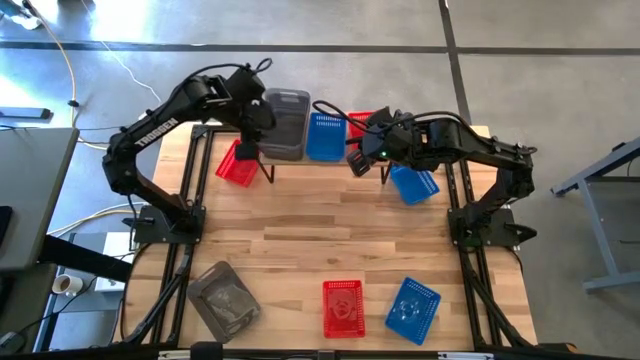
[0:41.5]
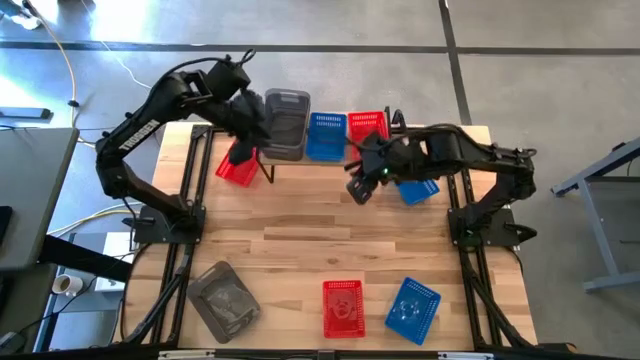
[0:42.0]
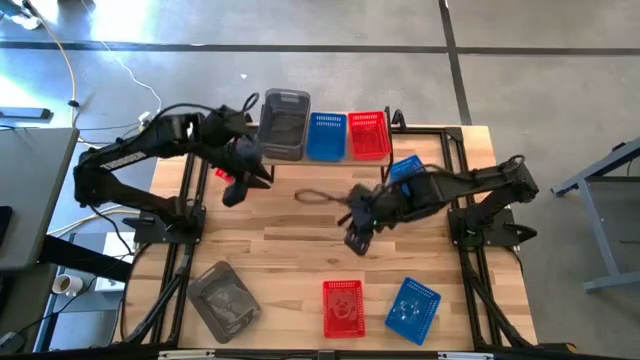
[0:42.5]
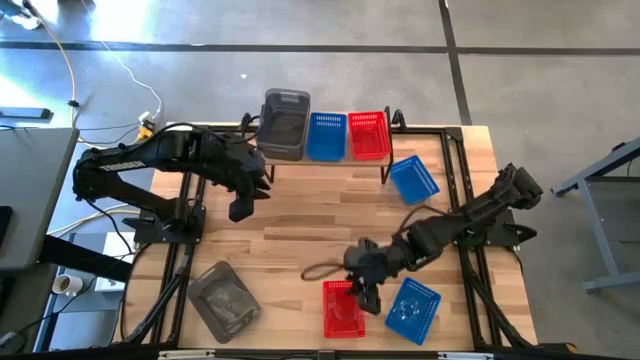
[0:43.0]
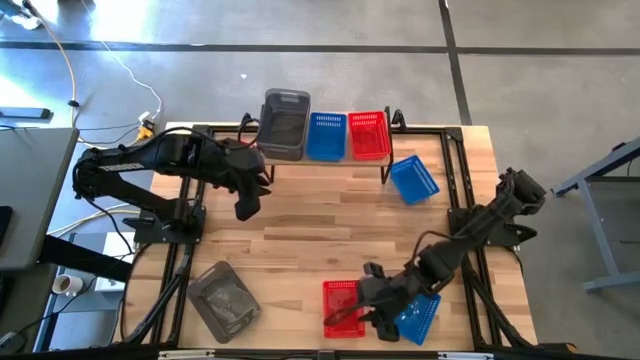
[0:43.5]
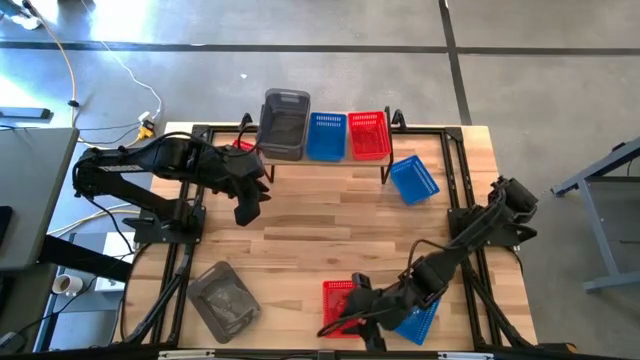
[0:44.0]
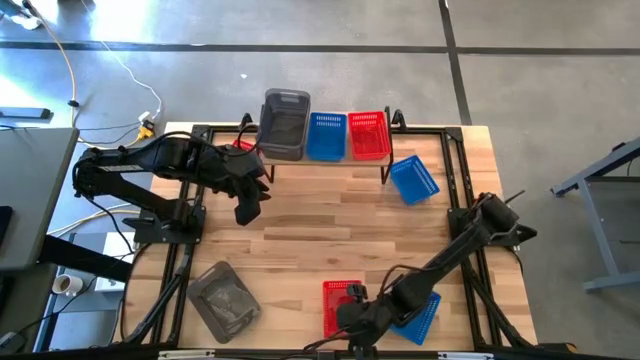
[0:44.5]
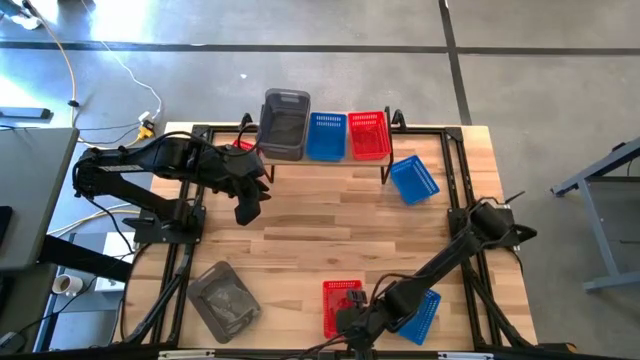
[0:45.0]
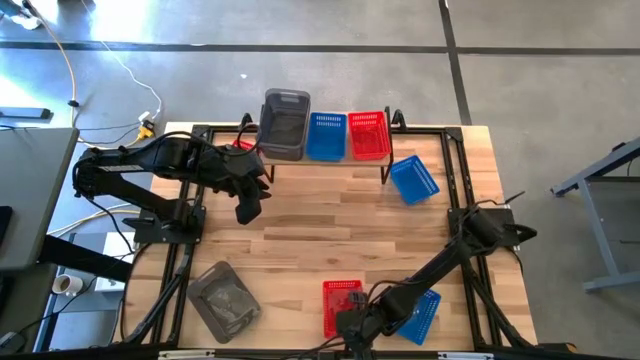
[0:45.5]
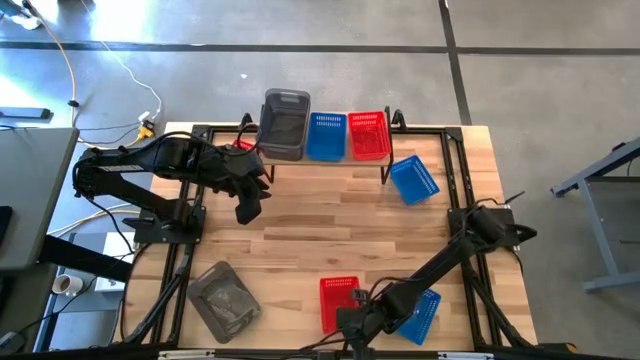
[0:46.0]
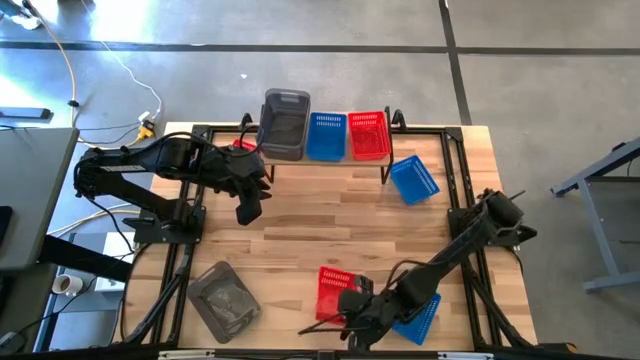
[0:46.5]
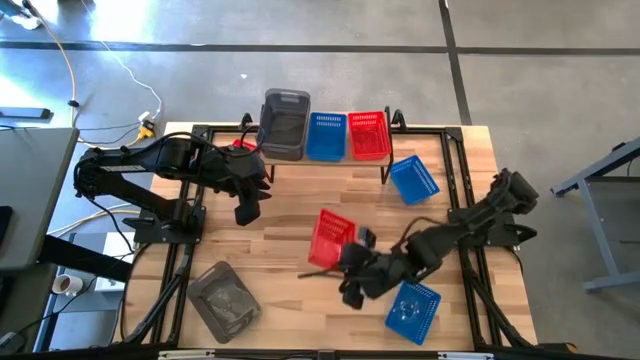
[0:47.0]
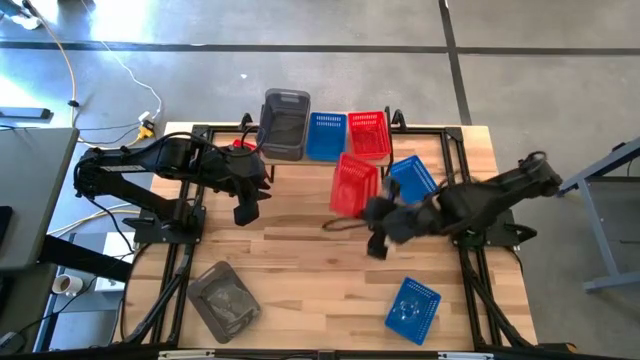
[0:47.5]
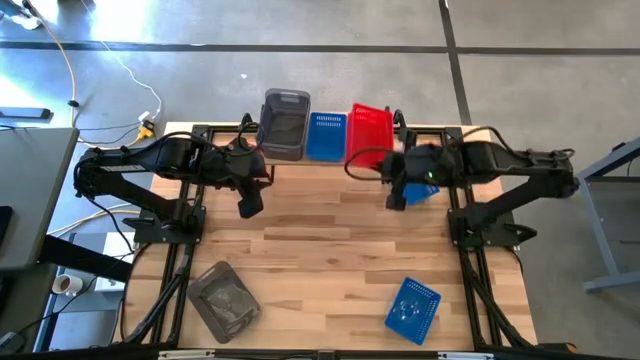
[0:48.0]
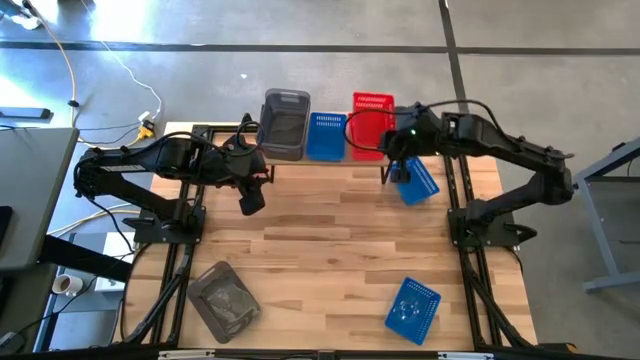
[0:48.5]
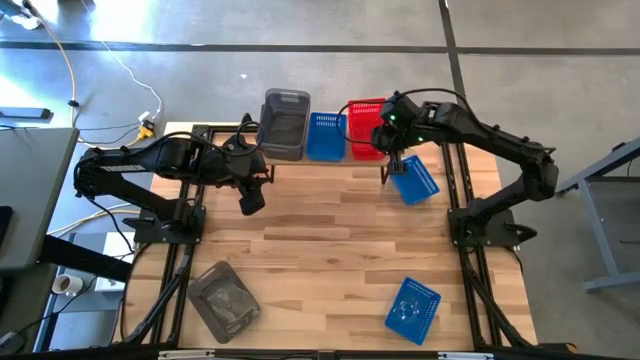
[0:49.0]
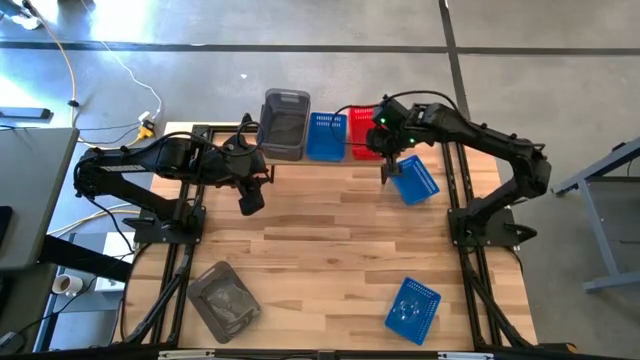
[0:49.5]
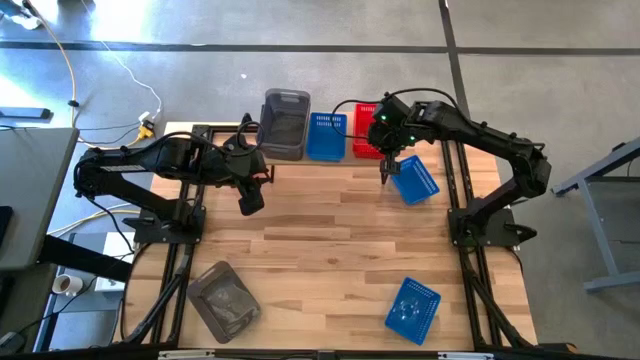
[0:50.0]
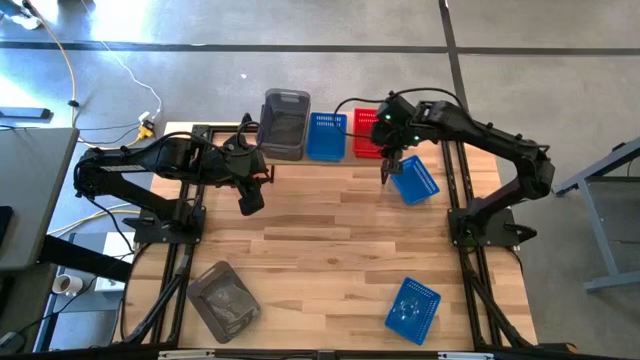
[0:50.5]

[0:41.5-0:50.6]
Task: Stack baskets on shelf by color
Stack the bottom red bin on top of the red bin on the shelf

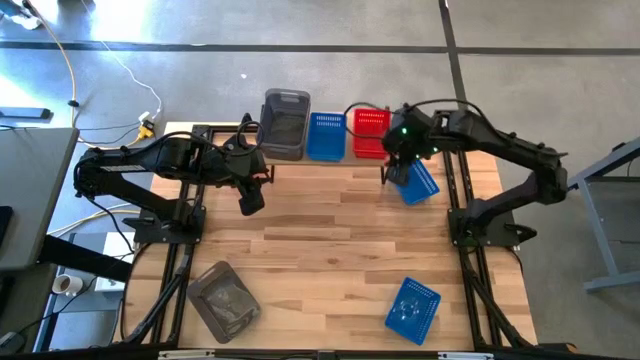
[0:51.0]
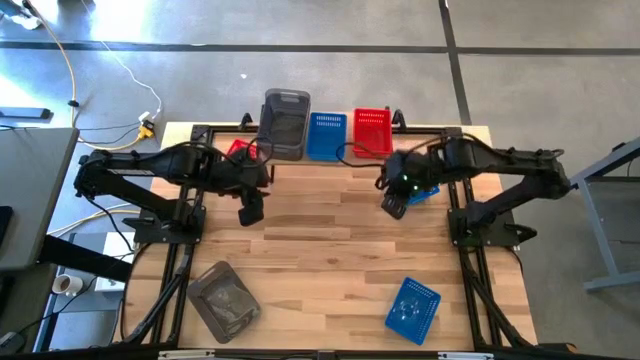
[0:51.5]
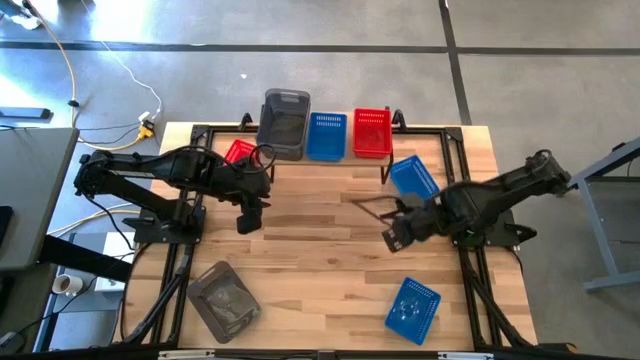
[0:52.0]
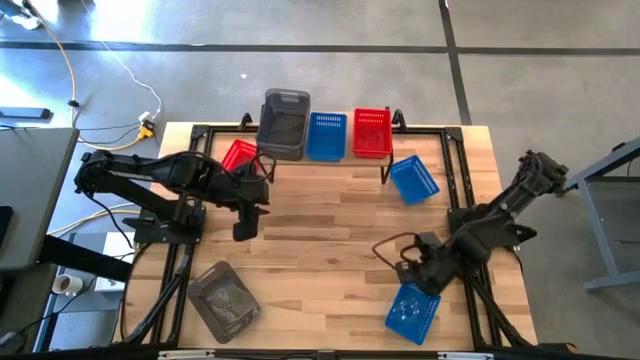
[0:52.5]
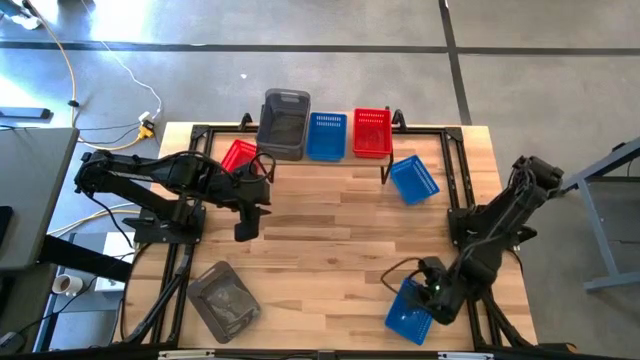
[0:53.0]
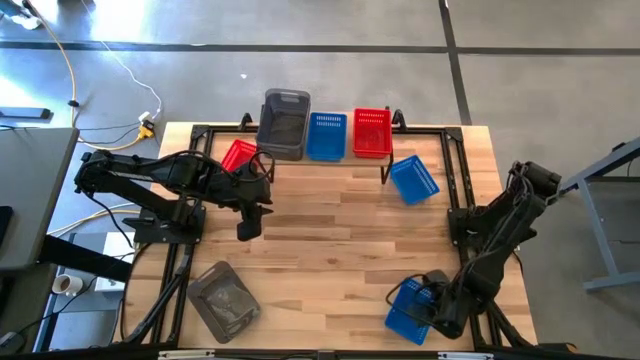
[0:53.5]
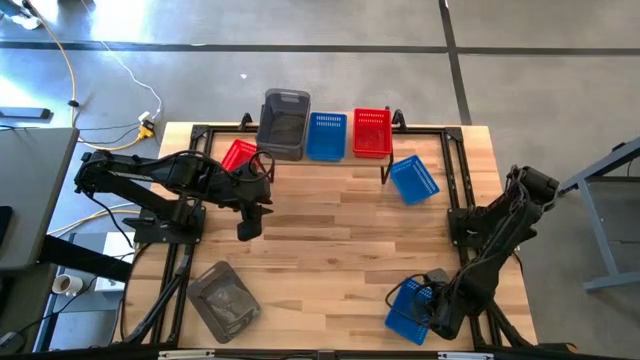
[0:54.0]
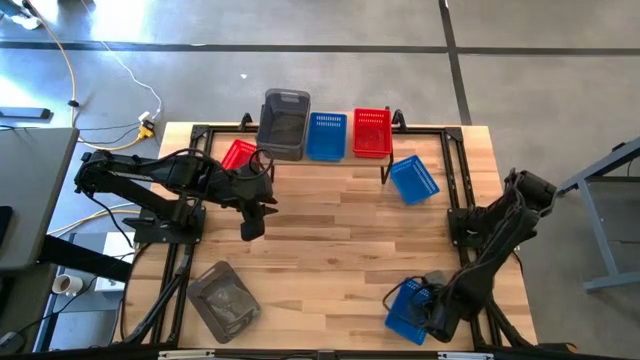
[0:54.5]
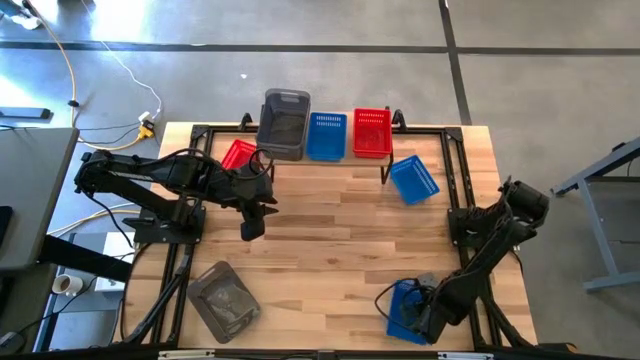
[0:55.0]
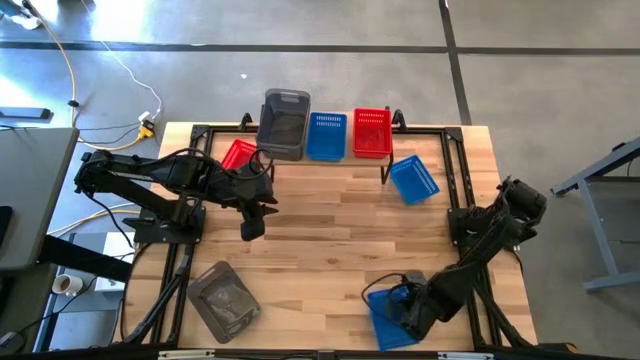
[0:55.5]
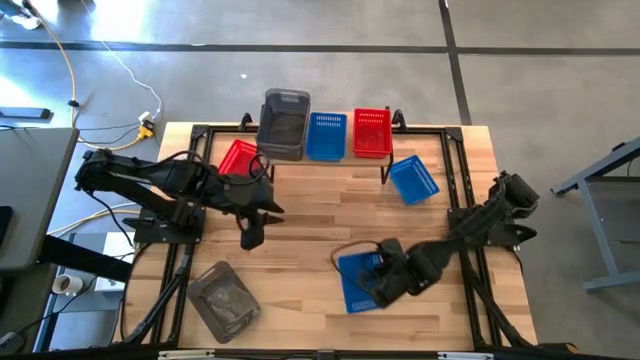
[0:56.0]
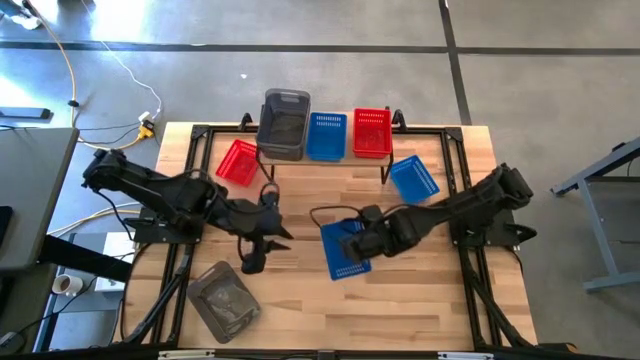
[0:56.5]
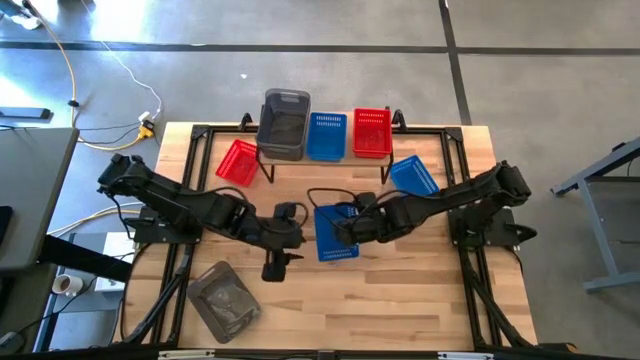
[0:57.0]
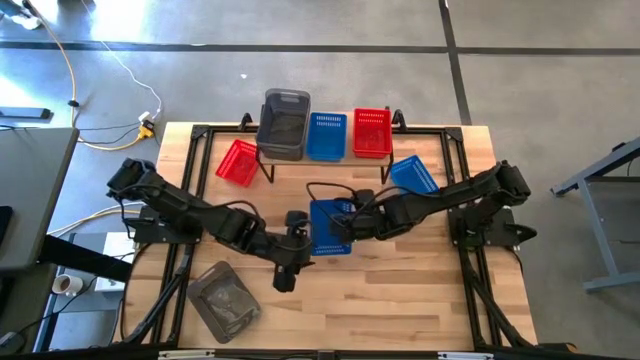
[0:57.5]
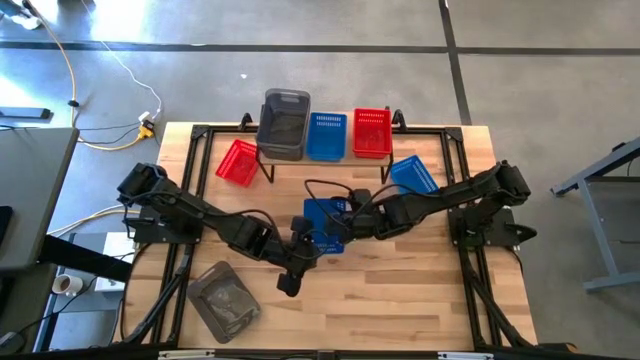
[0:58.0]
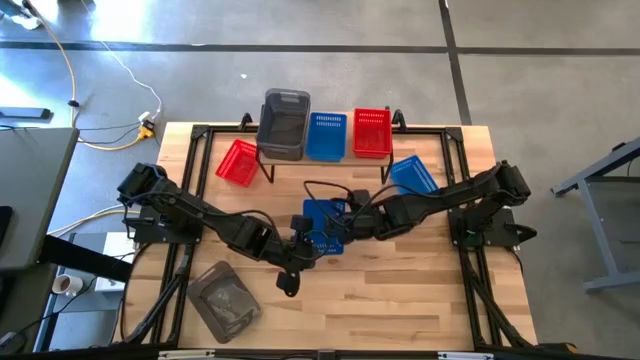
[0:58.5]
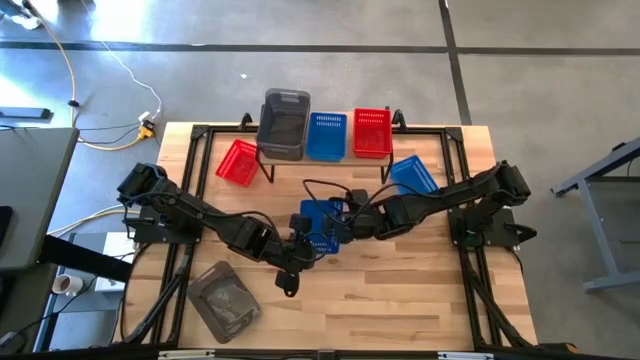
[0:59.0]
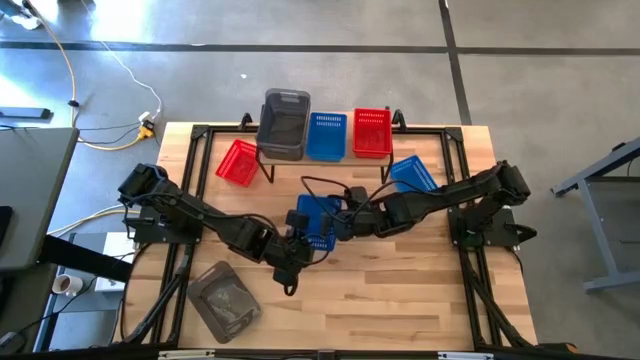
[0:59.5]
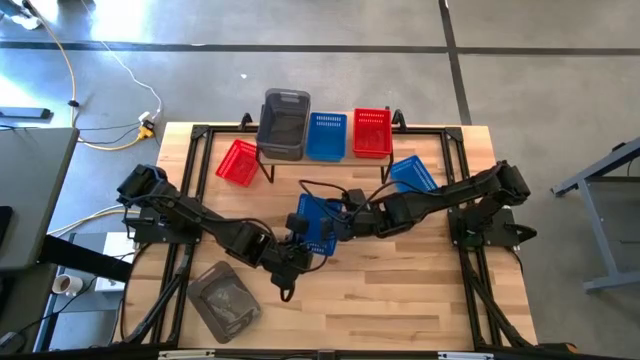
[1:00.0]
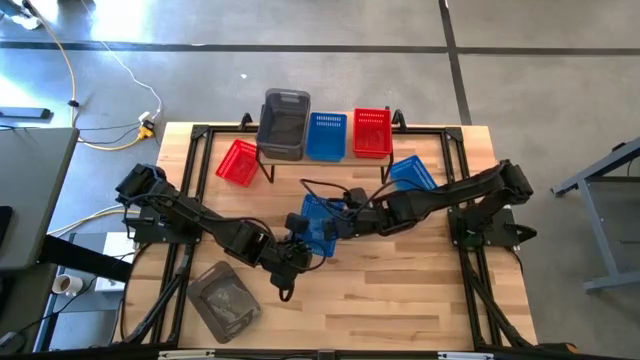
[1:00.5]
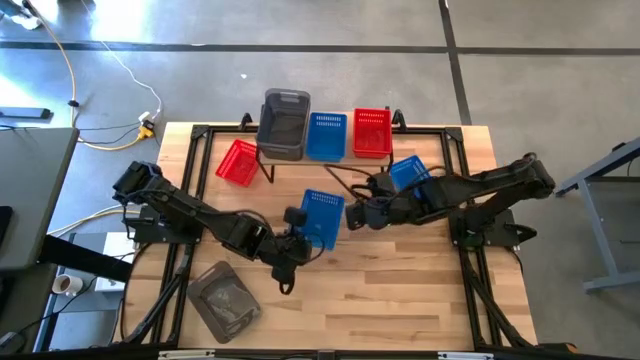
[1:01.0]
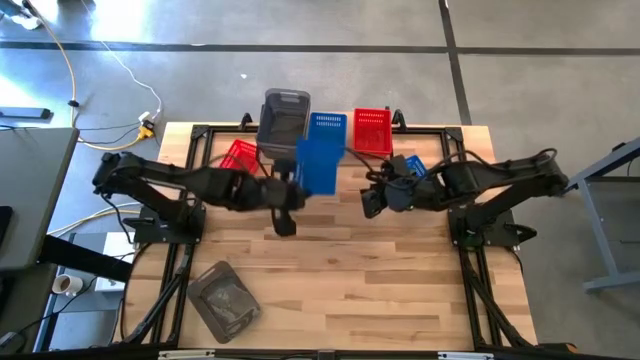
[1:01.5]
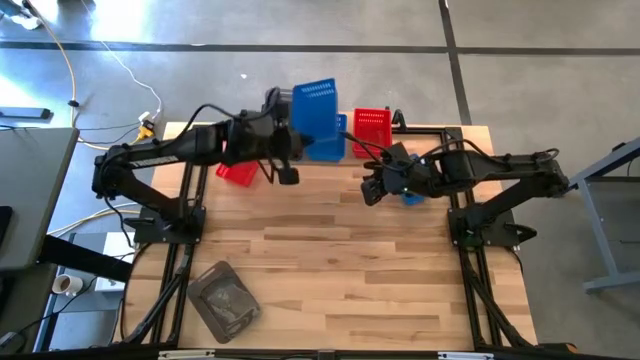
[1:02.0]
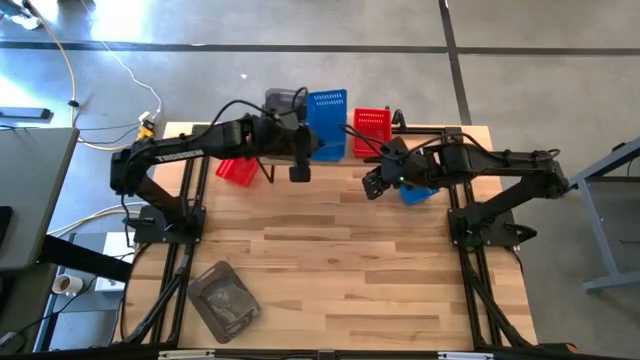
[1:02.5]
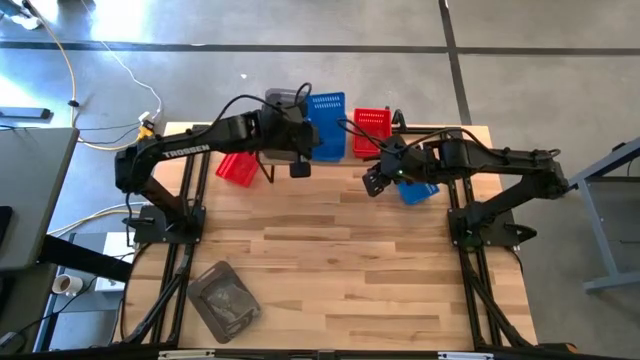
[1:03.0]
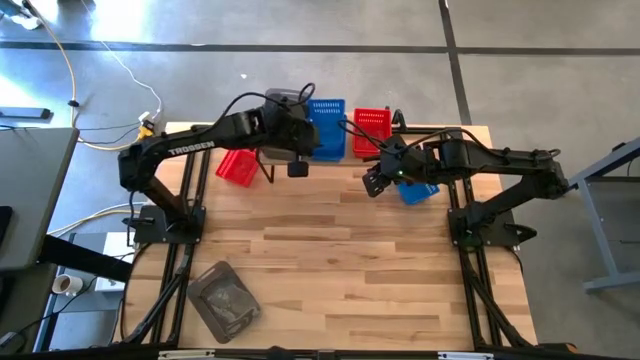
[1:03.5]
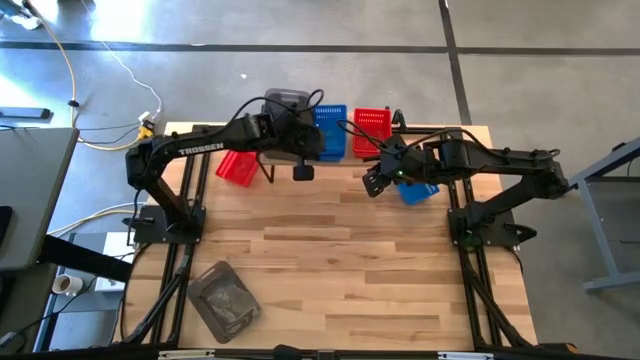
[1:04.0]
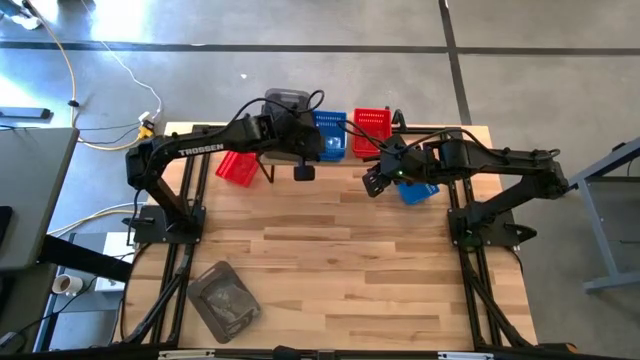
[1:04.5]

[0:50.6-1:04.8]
Stack the bottom blue bin on top of the blue bin on the shelf
